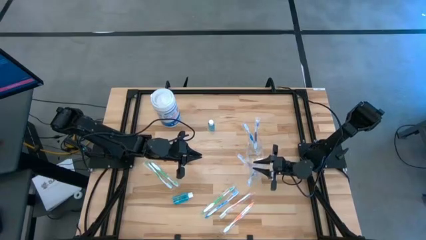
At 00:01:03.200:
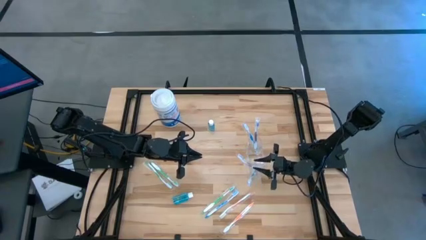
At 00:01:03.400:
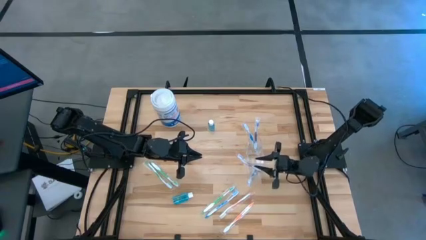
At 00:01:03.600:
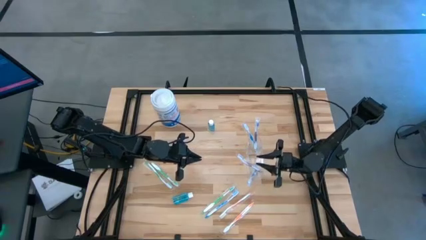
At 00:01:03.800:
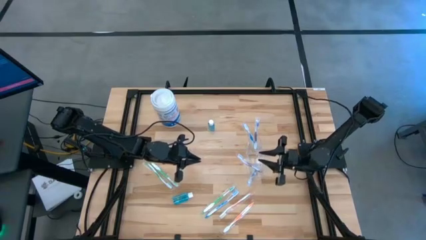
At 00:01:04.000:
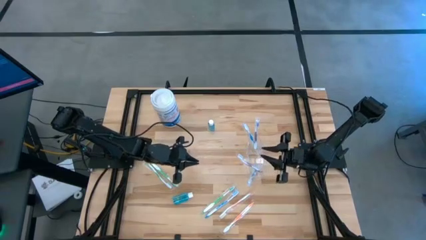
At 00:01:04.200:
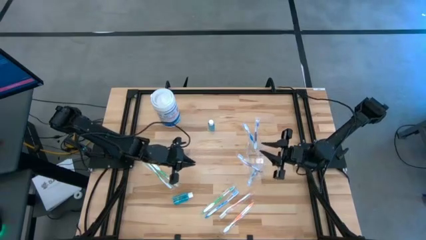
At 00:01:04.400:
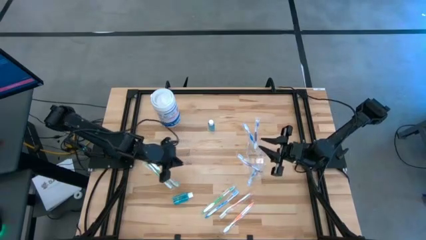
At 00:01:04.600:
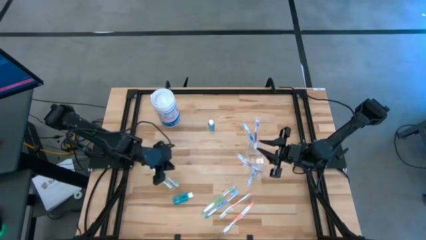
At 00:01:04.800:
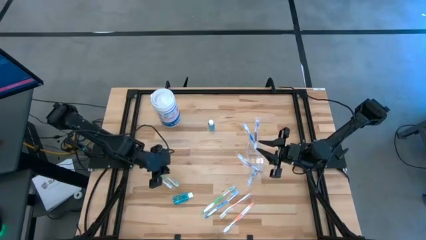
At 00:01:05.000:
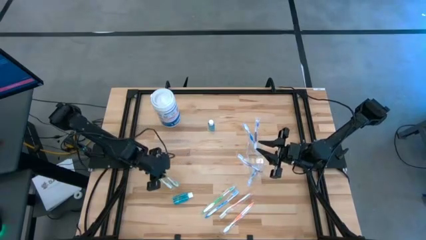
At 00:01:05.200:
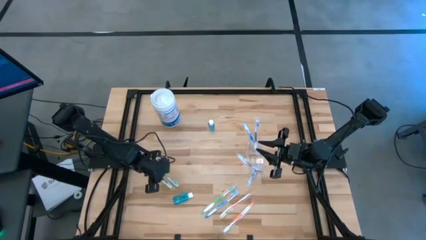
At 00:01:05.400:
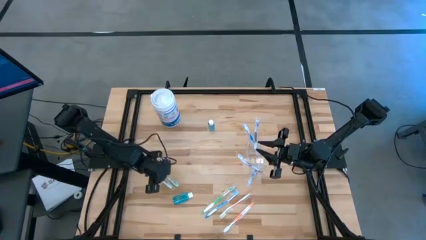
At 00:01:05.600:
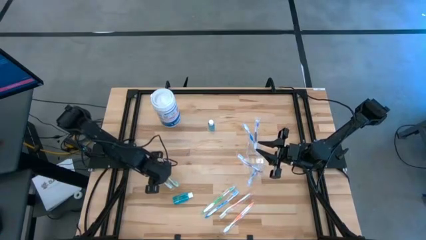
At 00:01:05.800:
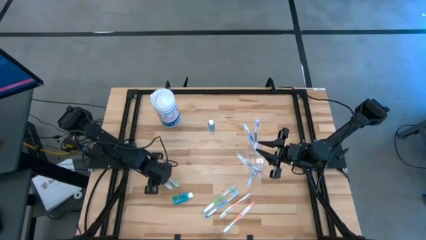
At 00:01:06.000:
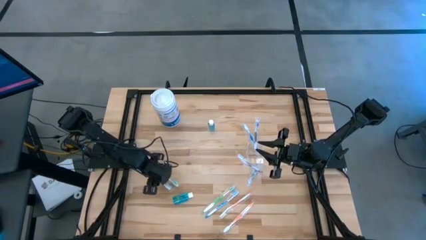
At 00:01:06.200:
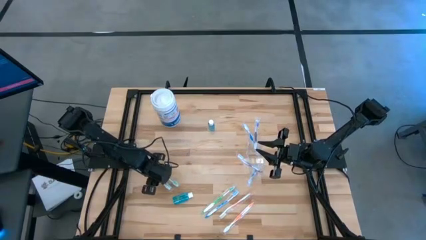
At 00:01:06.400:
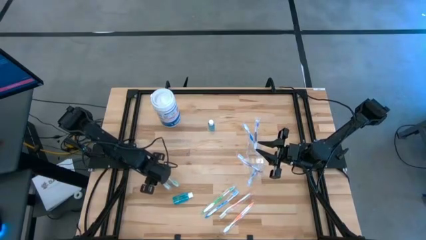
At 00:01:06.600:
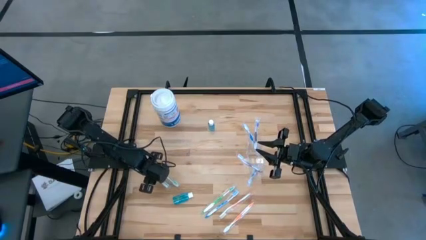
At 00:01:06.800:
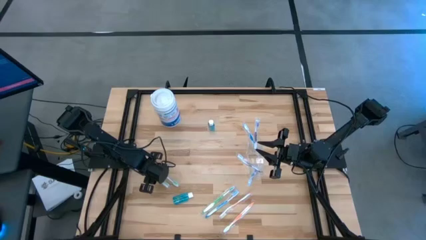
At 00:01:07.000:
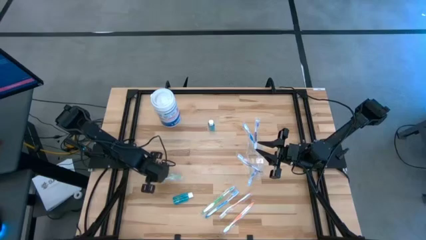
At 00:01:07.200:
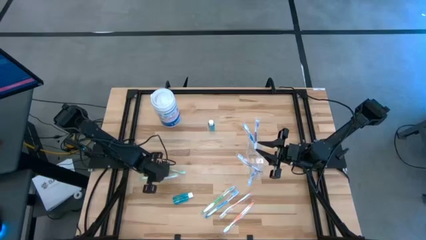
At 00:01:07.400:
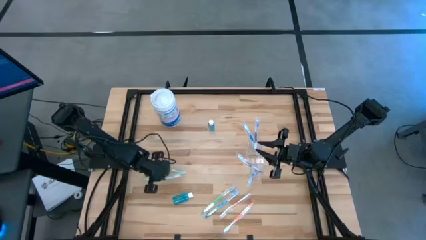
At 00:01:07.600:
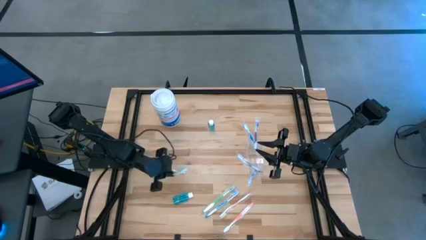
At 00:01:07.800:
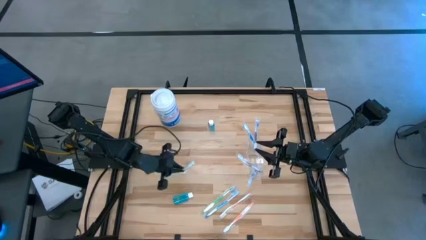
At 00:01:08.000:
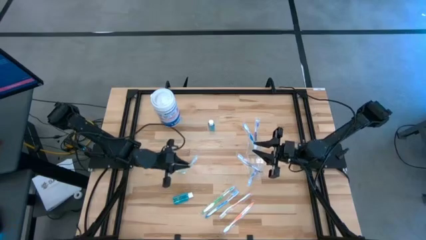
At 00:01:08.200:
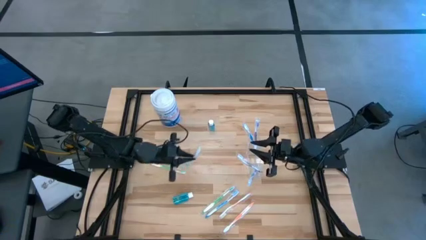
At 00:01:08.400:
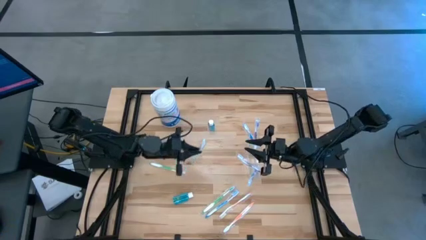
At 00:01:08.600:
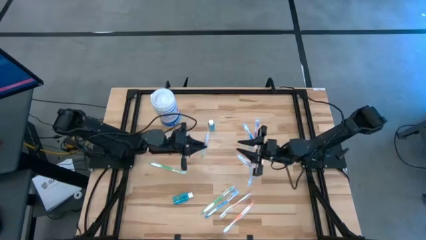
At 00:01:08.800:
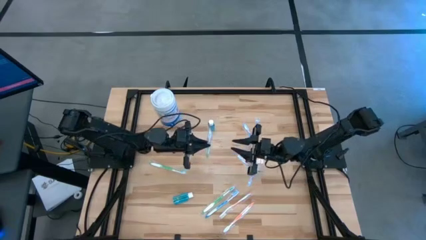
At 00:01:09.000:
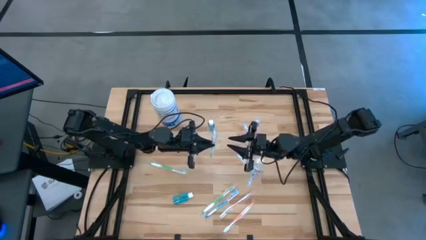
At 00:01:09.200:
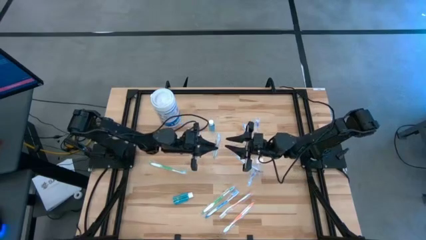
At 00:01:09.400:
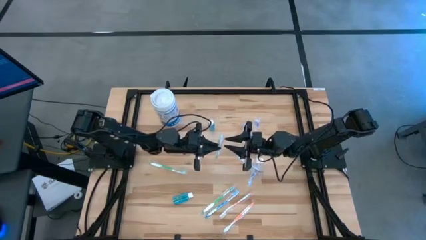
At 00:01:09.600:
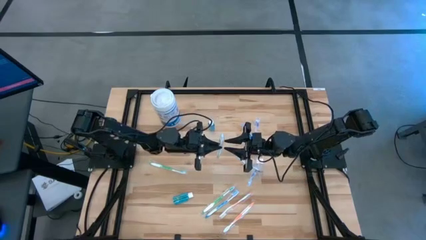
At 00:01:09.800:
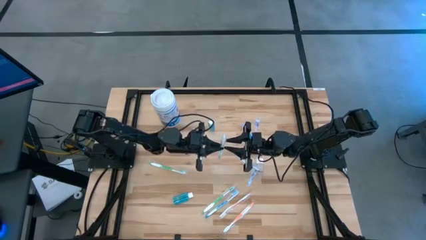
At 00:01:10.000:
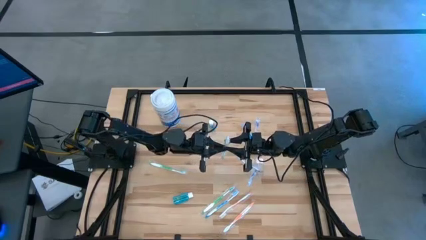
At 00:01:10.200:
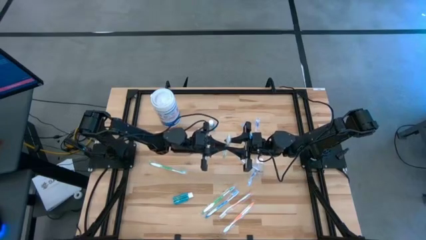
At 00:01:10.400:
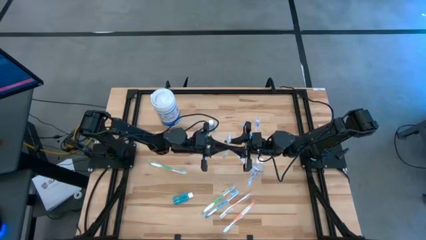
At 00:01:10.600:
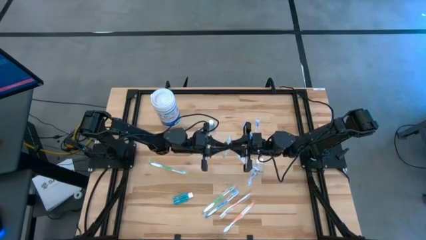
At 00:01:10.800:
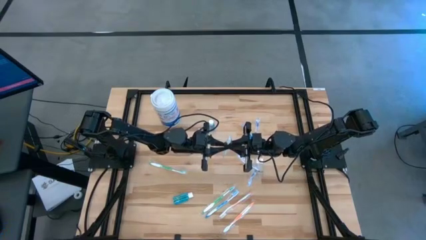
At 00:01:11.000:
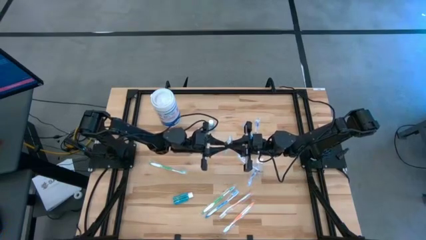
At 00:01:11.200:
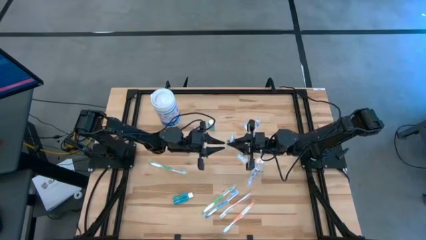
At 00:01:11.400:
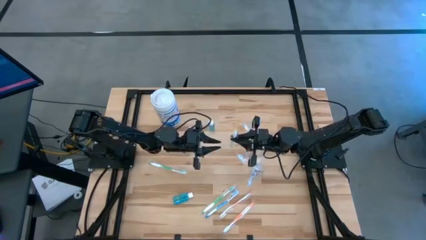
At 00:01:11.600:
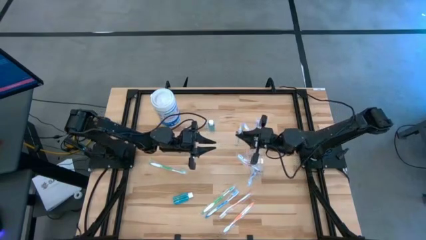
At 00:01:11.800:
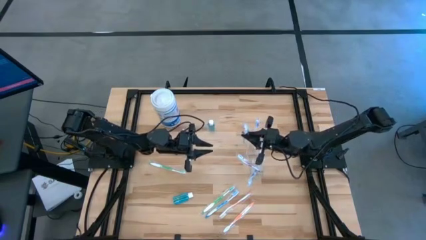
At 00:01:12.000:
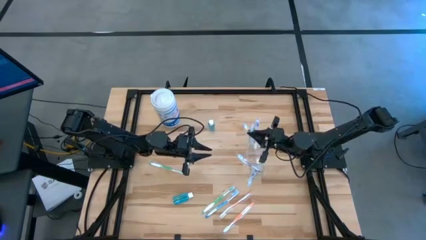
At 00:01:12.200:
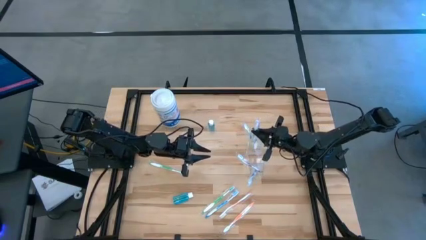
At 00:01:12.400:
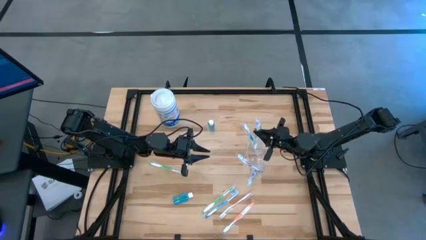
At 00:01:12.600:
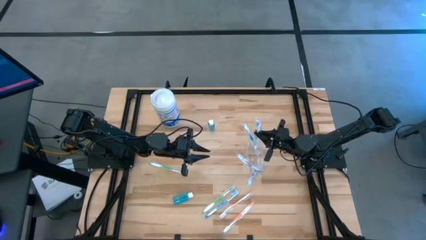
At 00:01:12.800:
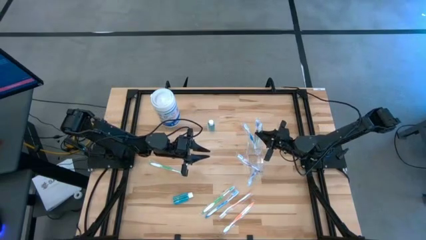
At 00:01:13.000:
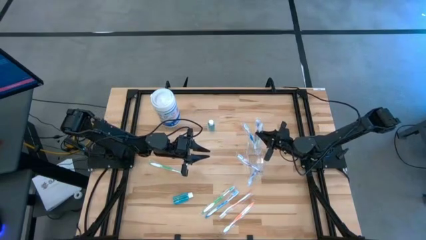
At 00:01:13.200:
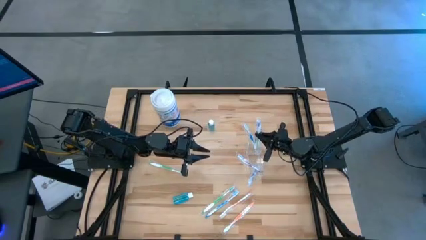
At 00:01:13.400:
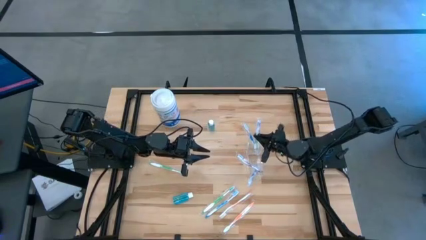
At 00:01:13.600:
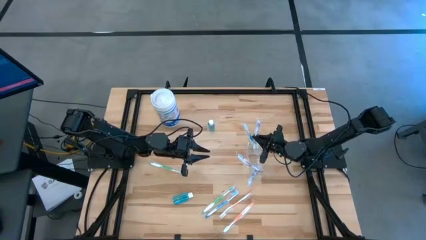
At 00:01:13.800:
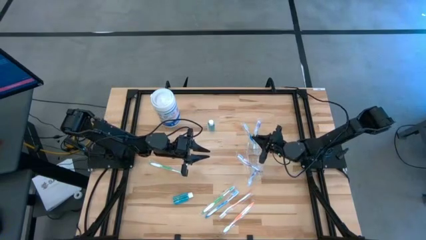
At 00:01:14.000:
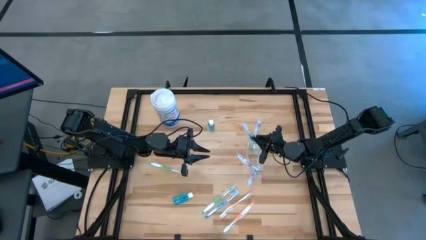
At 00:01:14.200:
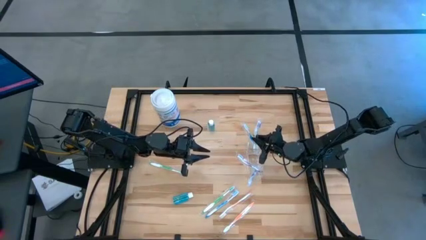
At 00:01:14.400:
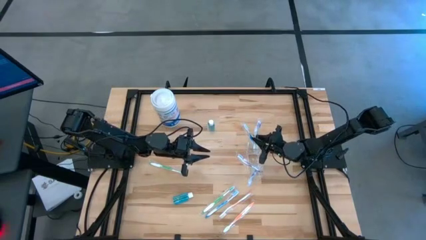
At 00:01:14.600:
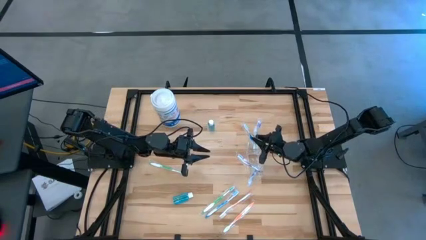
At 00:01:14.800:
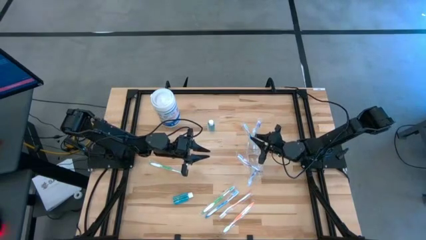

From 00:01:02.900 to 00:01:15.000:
Task: Pick & Place toothbrushing station
Put the green toothbrush into the transparent organizer

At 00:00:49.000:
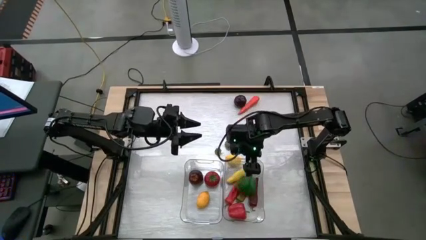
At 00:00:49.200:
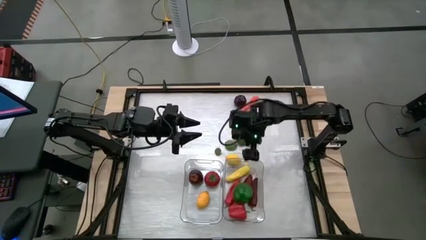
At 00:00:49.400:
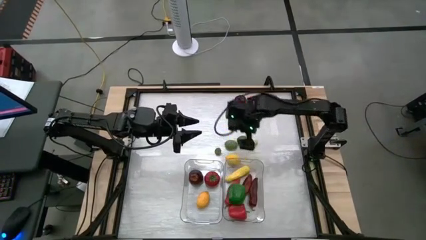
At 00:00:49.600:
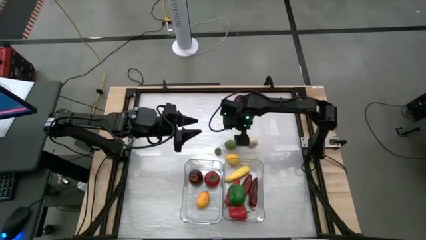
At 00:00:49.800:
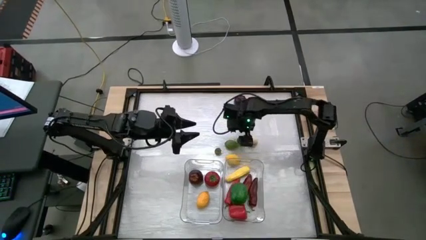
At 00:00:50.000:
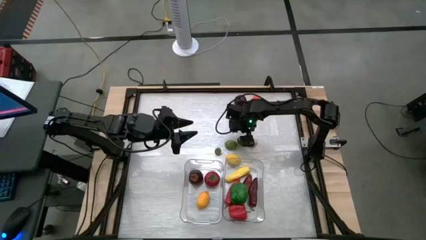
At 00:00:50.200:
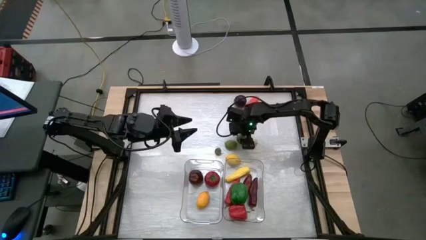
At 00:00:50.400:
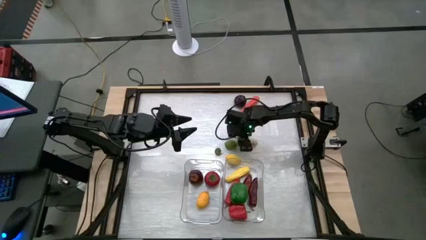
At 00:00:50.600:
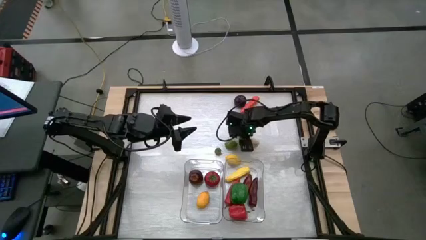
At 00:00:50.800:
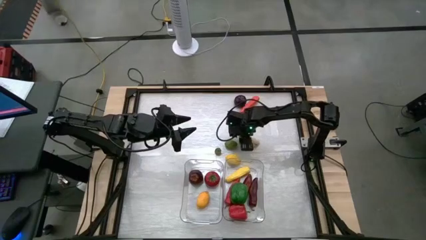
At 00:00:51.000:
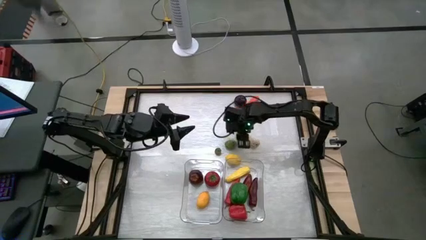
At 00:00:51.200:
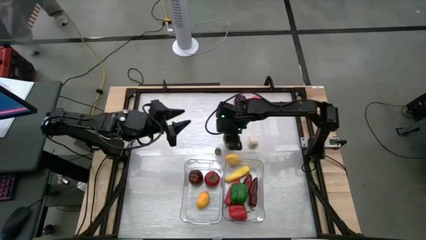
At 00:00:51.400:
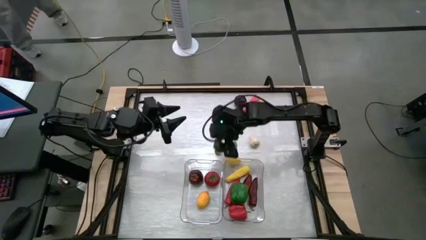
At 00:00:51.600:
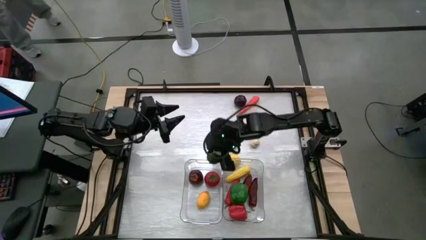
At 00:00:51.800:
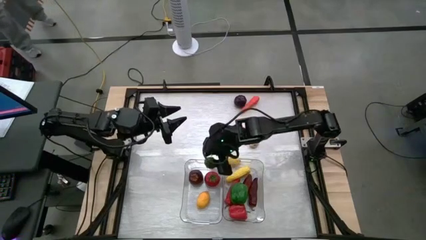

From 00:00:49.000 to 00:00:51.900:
Task: Sort produce into baskets
Put the right lime into the left transparent bin

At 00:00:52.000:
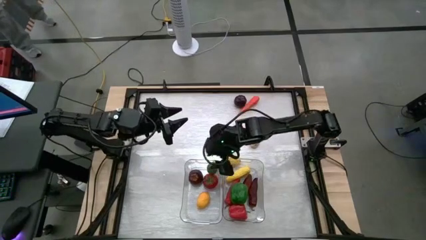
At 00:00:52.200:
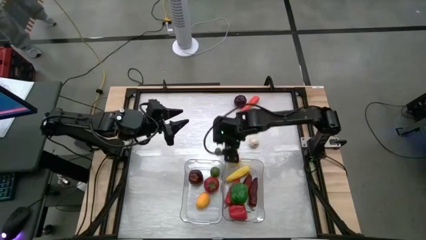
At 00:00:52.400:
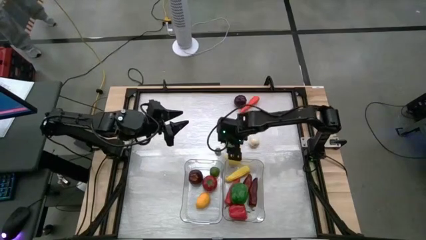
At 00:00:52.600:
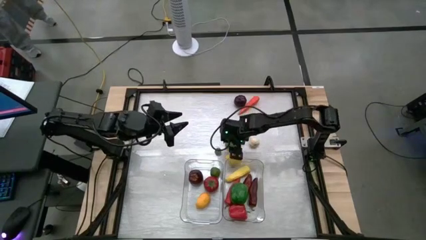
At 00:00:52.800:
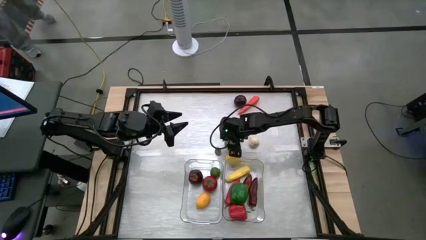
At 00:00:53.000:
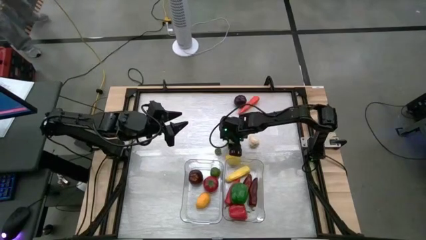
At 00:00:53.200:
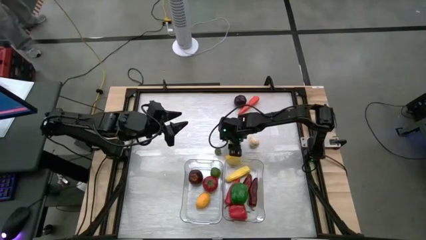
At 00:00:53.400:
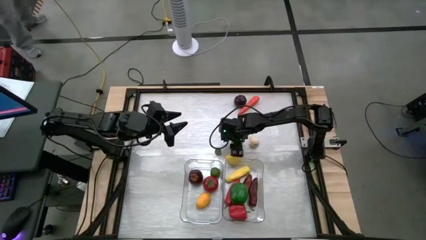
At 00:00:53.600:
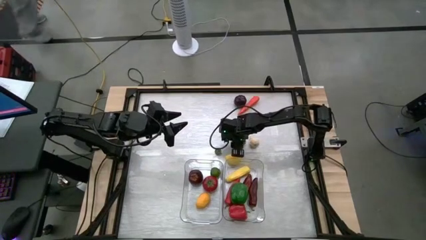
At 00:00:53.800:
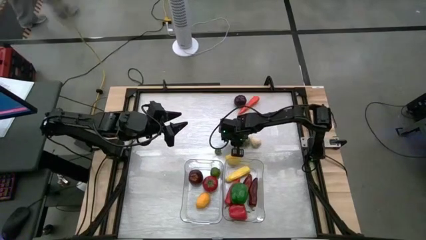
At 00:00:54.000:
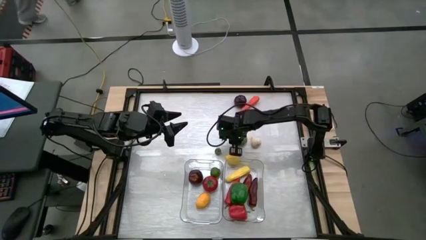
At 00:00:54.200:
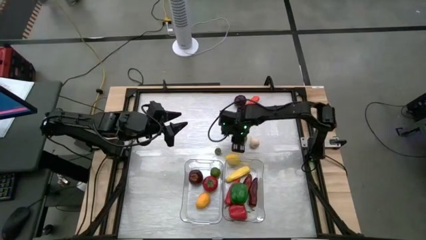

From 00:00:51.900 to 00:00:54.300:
Put the lime into the left transparent bin
